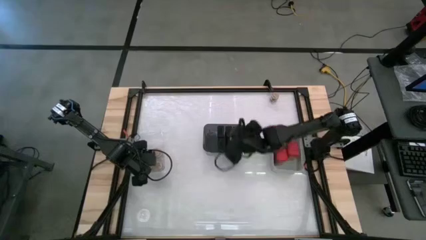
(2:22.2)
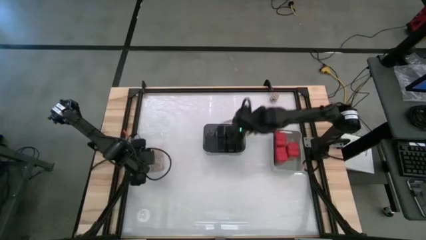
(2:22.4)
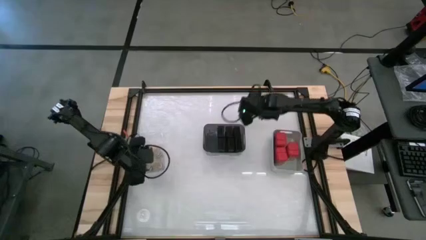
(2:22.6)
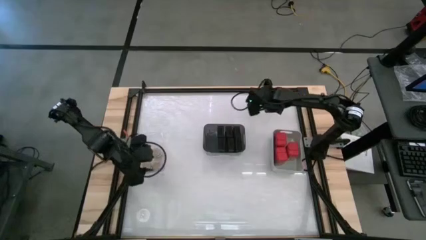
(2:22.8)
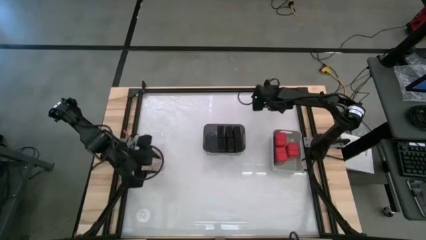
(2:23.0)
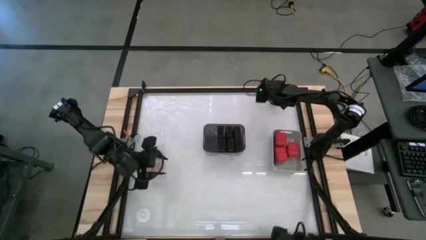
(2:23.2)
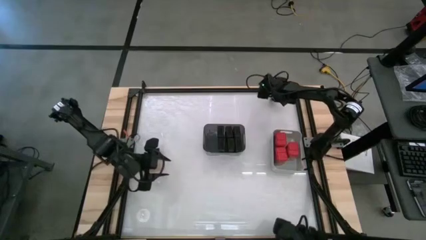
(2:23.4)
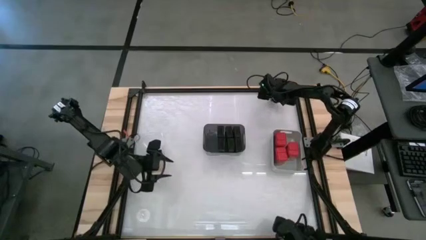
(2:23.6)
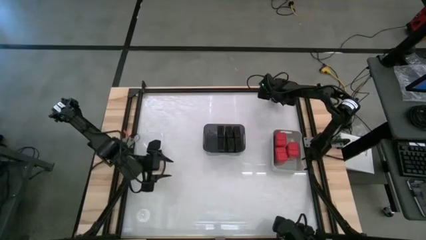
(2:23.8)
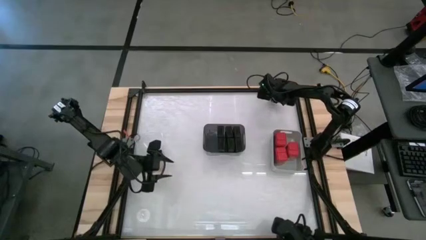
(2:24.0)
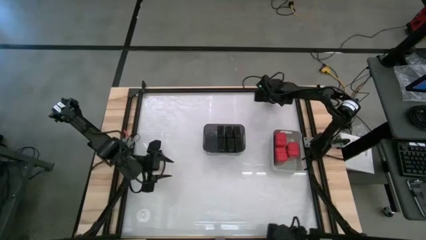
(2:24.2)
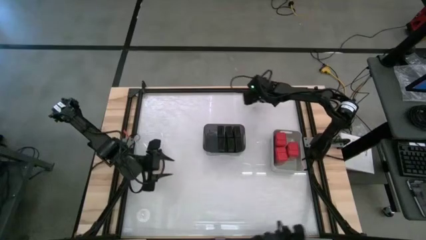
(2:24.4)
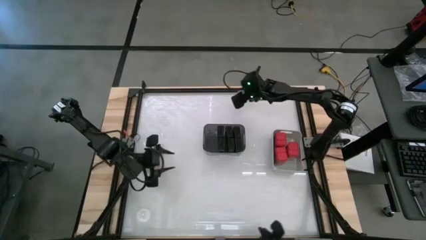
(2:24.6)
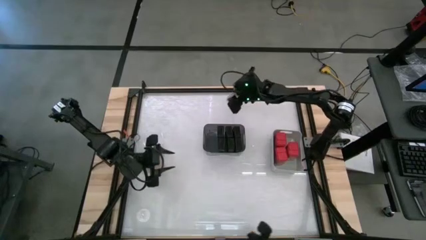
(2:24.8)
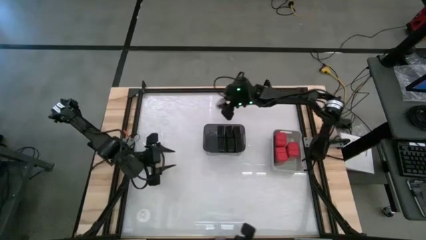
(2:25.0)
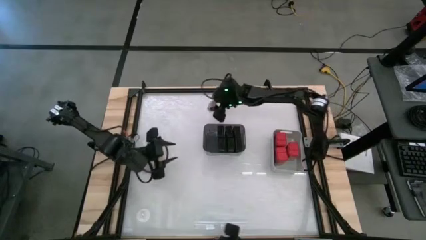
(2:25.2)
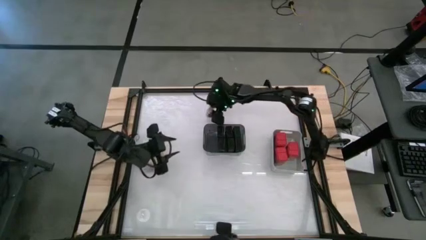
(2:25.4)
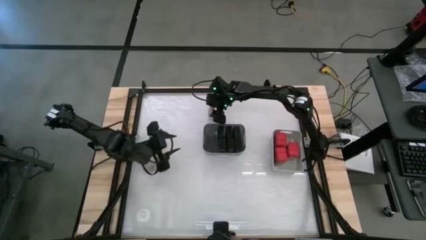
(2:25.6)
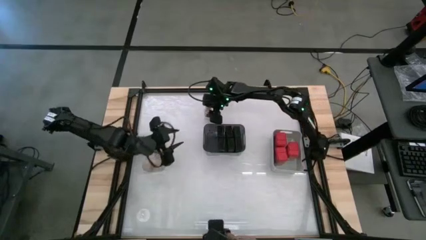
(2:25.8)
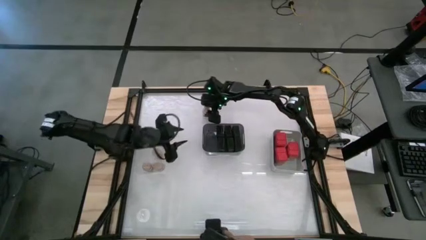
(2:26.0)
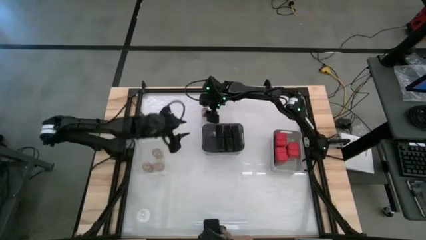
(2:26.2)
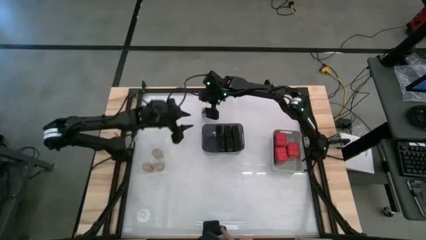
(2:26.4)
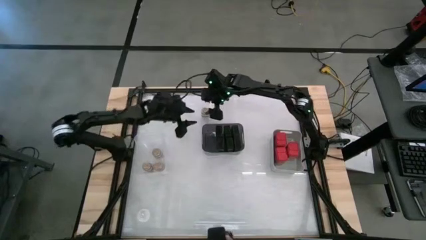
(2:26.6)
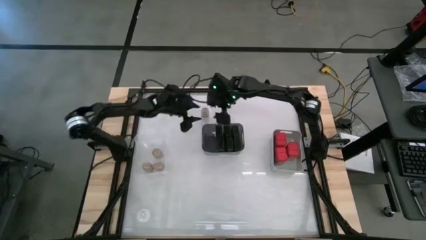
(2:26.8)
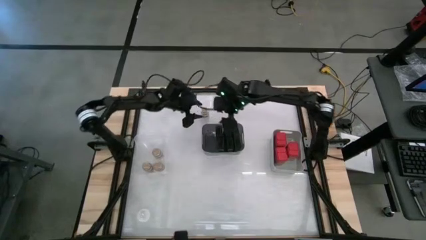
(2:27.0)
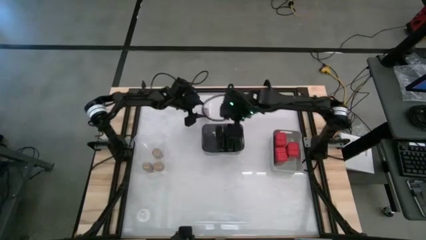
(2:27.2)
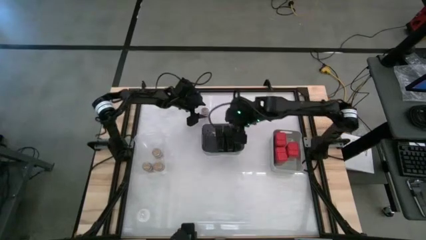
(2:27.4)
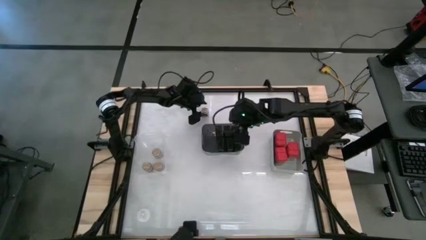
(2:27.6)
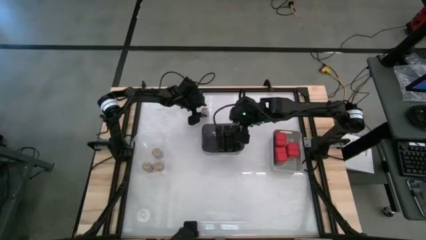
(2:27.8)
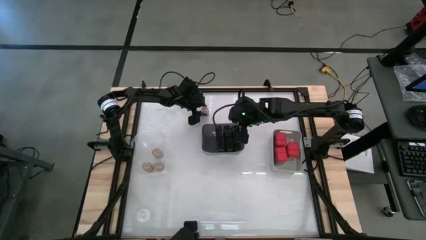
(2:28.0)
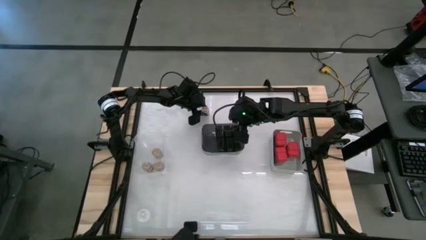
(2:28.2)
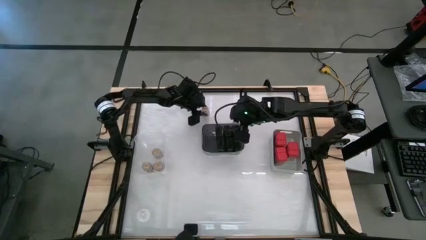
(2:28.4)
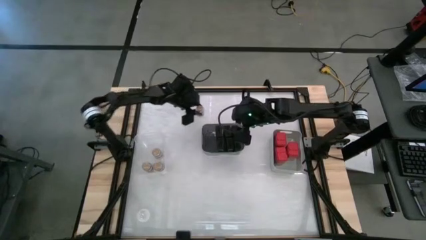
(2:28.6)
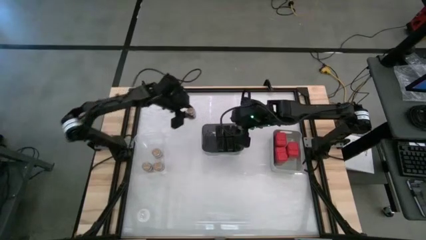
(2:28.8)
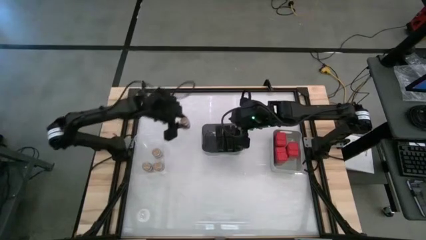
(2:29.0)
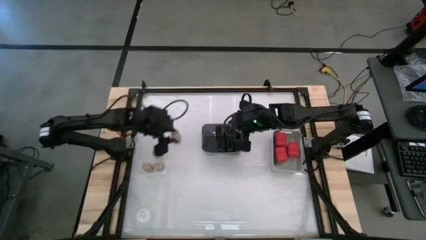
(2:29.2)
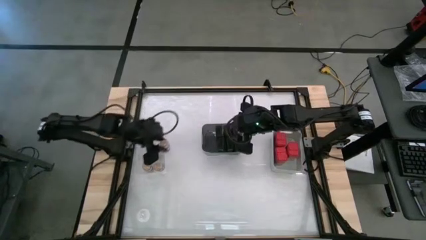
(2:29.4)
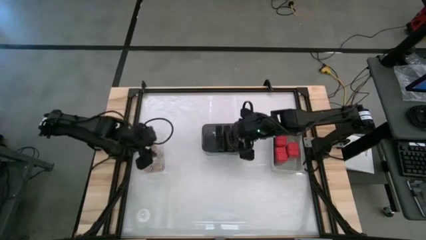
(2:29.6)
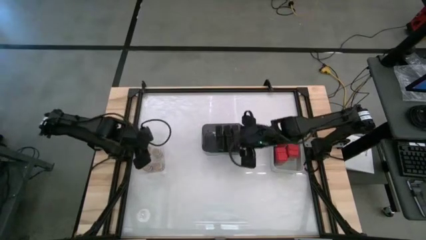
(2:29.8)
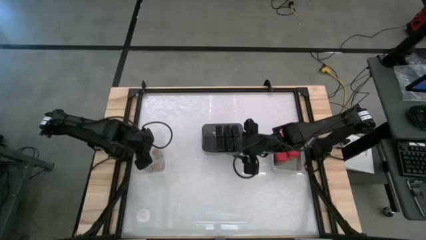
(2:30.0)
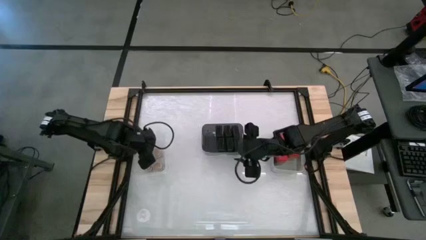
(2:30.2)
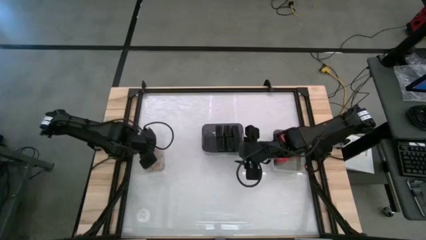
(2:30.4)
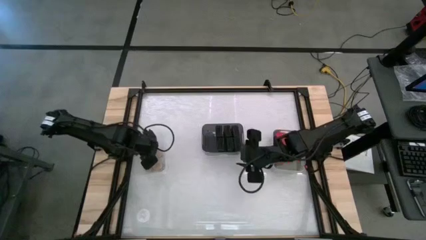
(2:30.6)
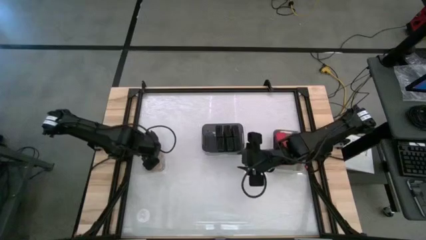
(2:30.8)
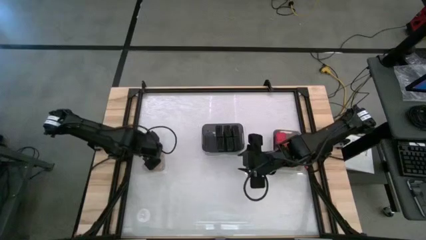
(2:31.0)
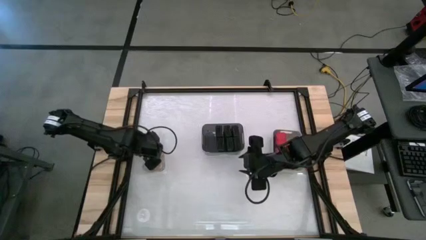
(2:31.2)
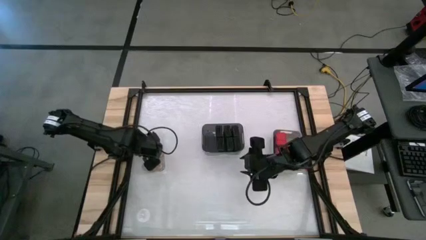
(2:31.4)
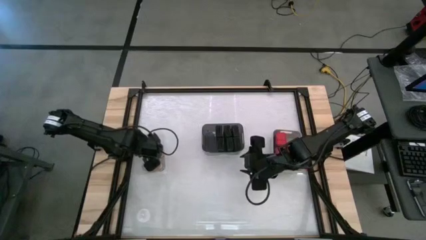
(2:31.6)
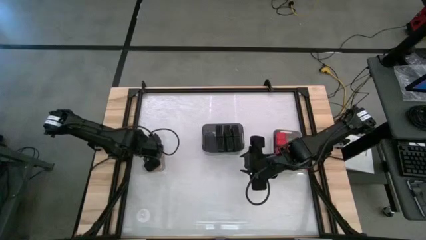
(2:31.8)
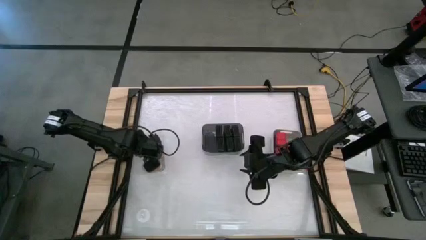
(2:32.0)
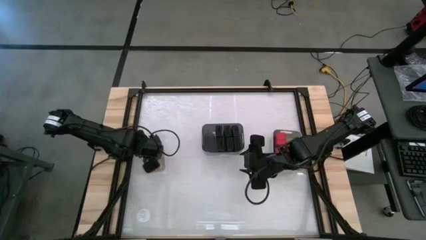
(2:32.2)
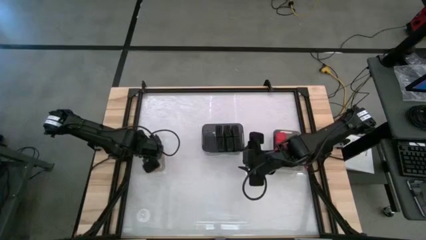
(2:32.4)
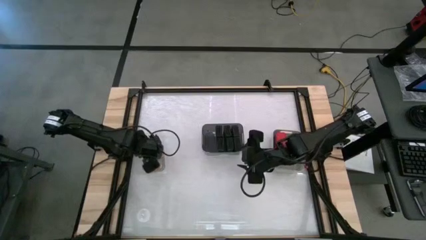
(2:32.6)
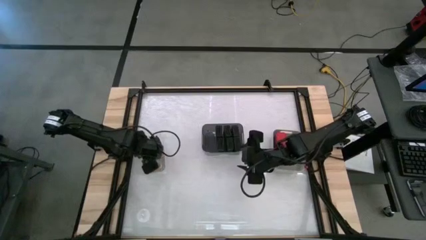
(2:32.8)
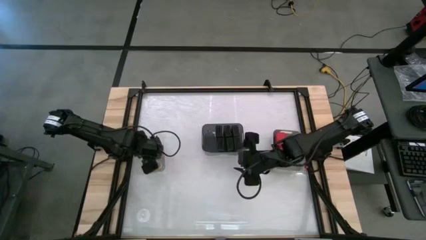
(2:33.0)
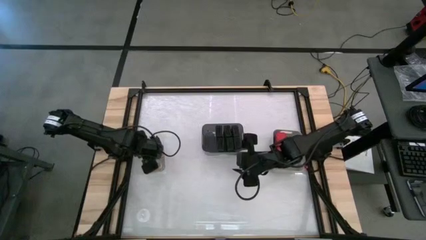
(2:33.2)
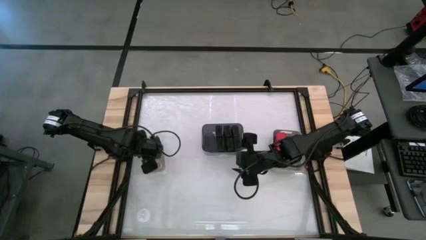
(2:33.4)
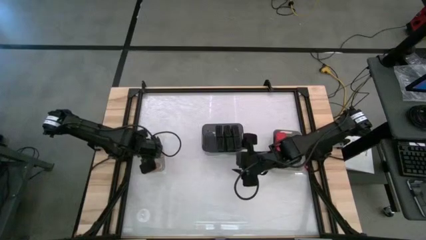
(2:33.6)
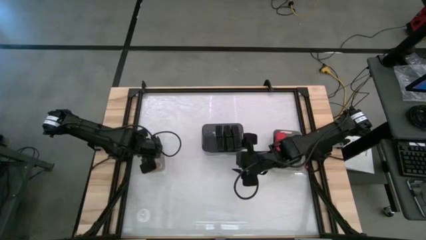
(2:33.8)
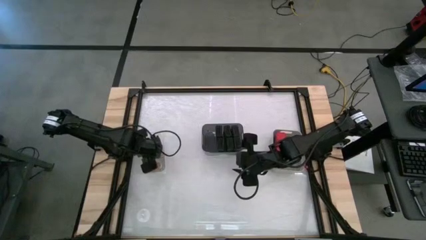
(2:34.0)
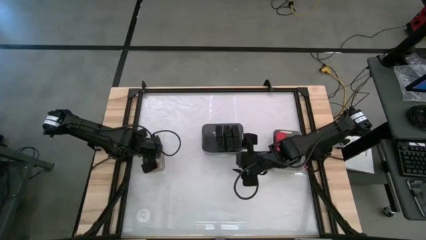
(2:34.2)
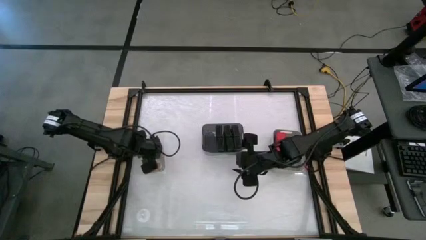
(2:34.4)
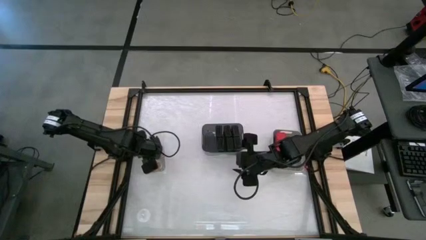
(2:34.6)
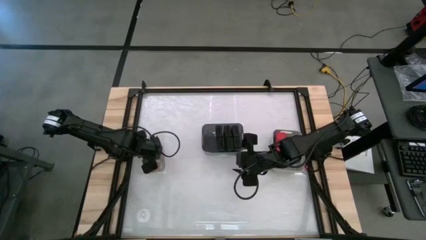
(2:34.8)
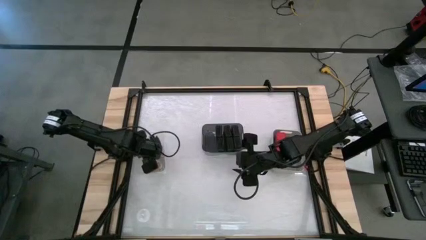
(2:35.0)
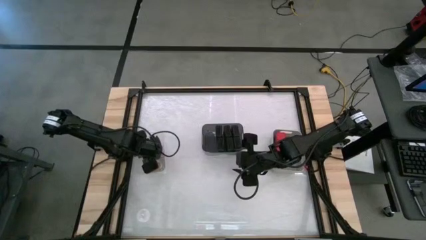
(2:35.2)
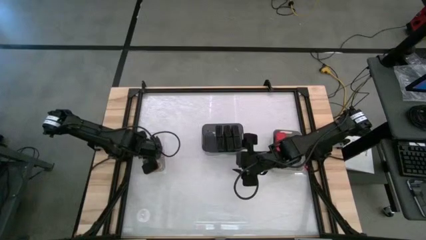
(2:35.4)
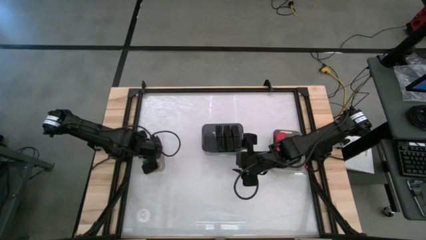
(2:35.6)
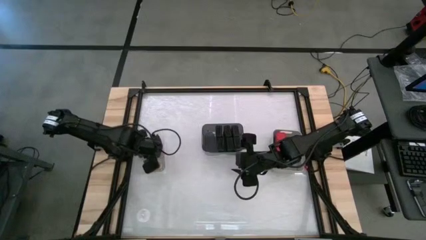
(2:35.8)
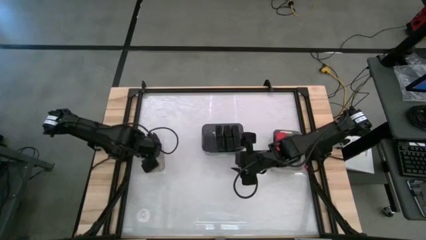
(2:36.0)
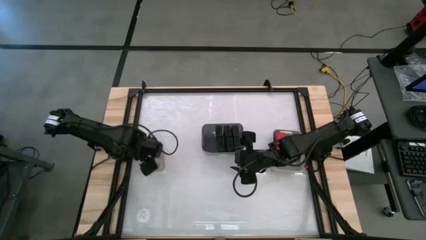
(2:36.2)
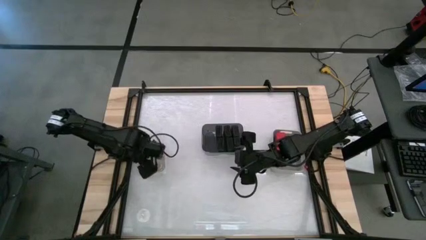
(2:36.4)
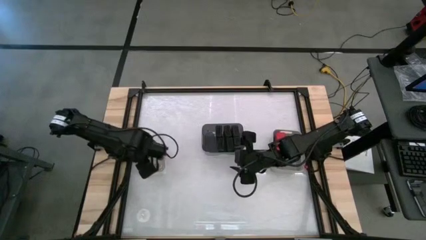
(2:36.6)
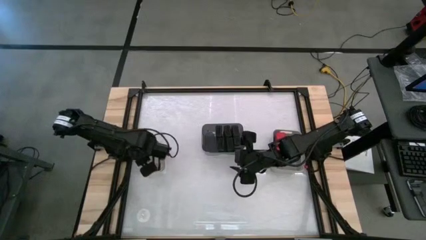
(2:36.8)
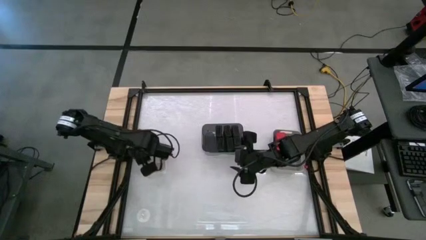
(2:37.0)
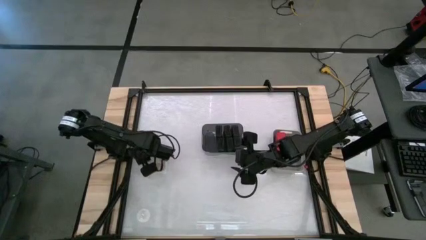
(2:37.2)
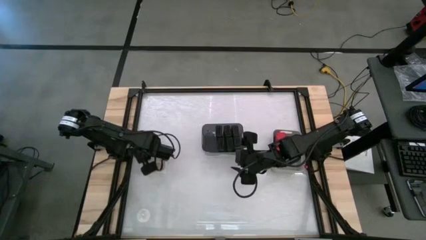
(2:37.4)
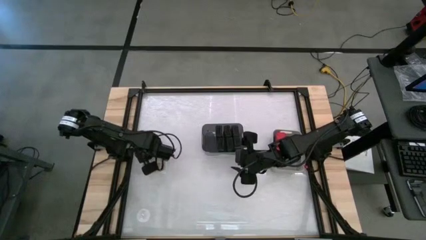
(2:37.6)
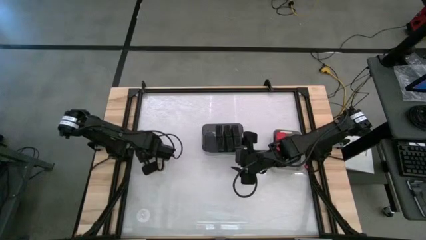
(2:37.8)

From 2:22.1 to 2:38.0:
Task: Sort spices by type
Put the brown spice bottle into the transparent bin
